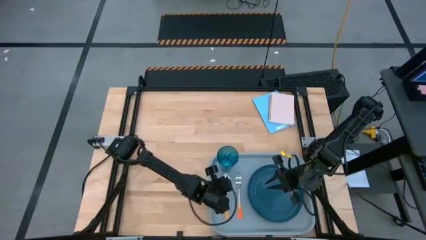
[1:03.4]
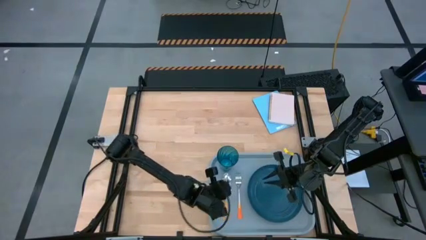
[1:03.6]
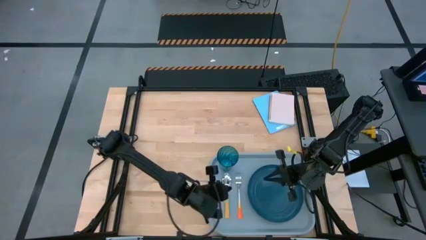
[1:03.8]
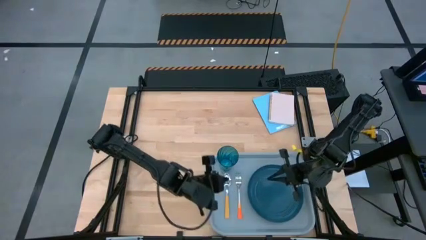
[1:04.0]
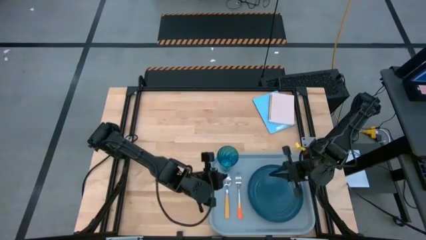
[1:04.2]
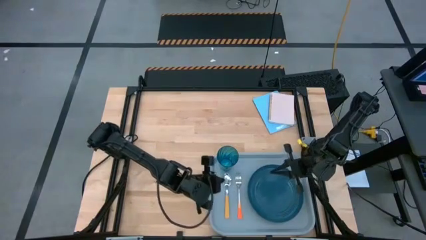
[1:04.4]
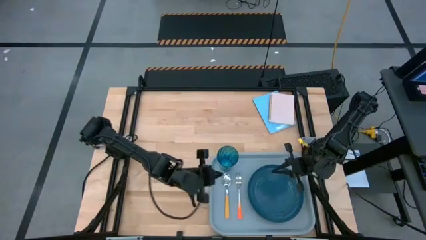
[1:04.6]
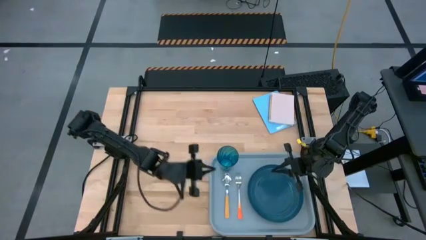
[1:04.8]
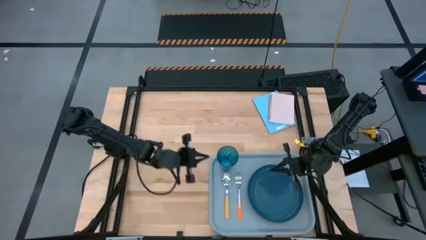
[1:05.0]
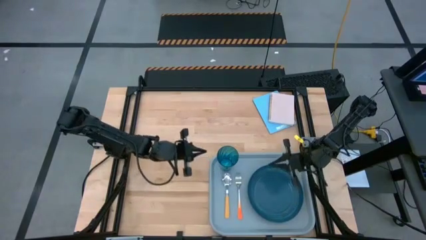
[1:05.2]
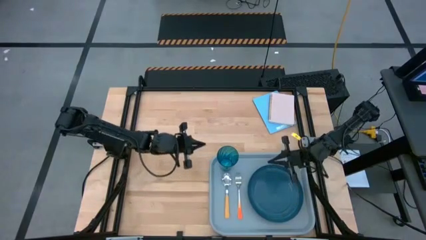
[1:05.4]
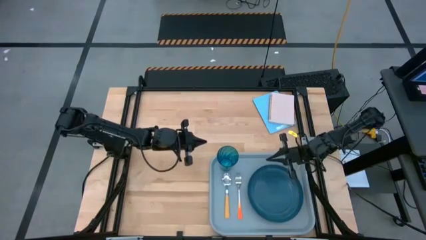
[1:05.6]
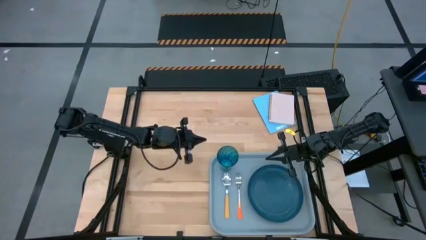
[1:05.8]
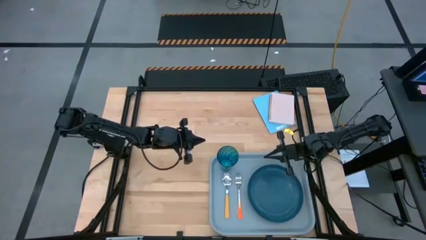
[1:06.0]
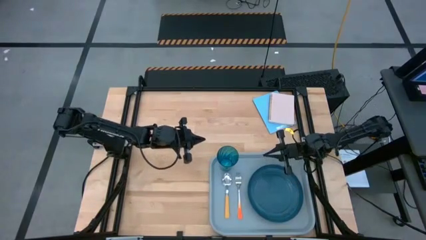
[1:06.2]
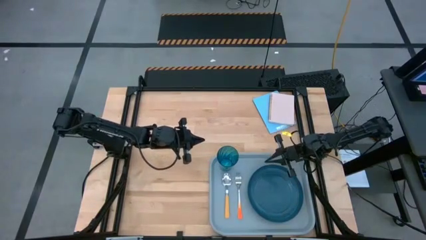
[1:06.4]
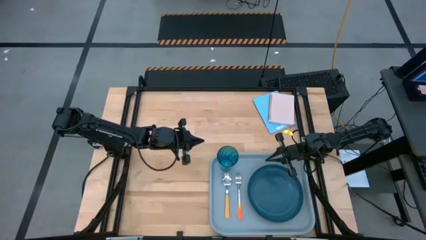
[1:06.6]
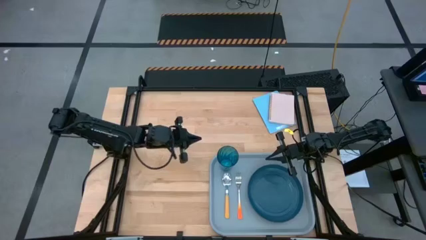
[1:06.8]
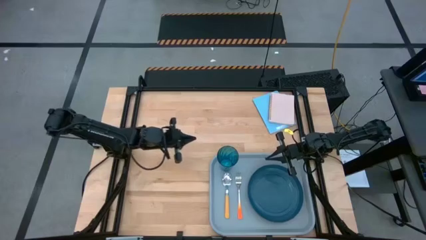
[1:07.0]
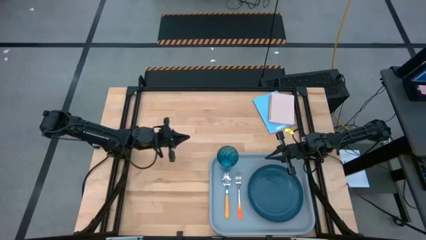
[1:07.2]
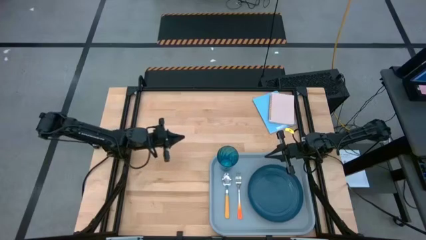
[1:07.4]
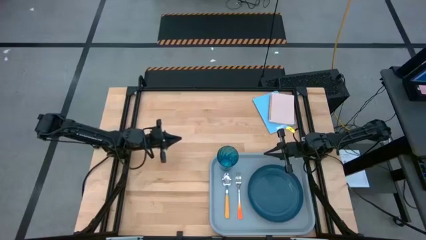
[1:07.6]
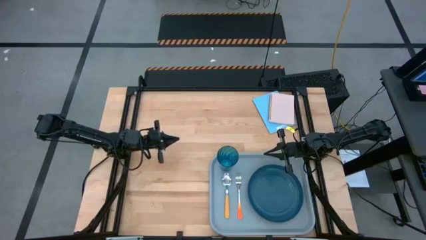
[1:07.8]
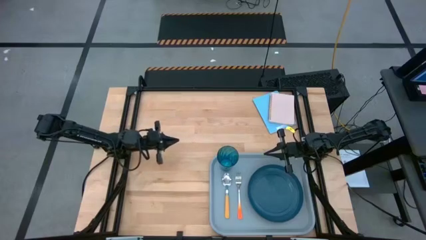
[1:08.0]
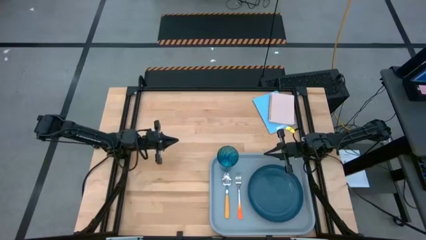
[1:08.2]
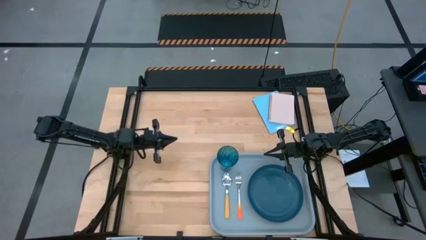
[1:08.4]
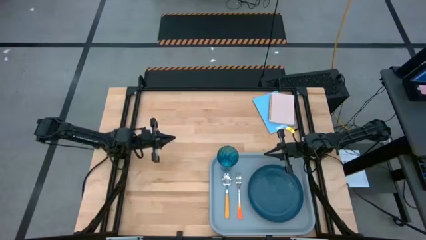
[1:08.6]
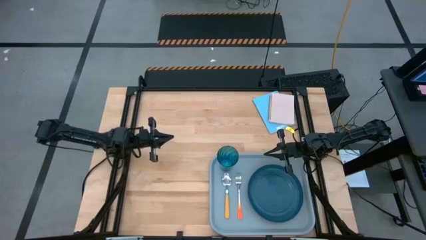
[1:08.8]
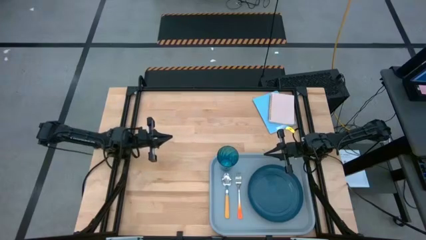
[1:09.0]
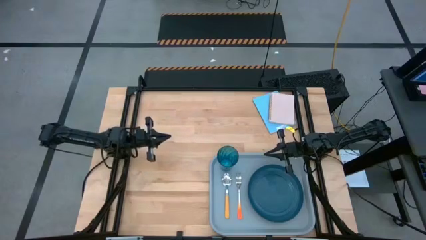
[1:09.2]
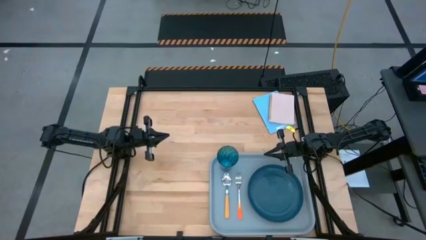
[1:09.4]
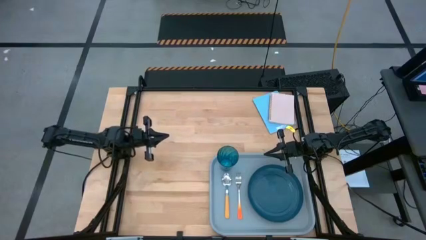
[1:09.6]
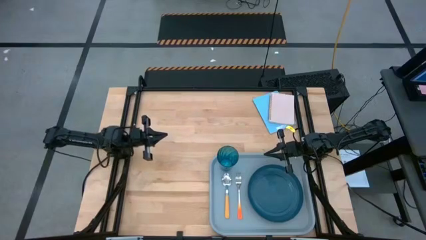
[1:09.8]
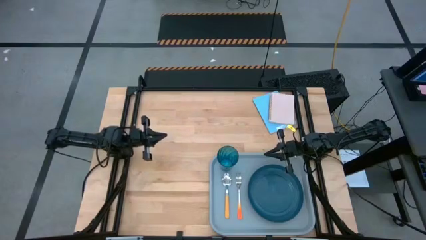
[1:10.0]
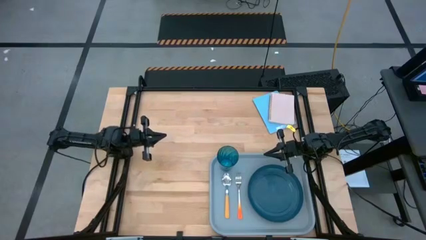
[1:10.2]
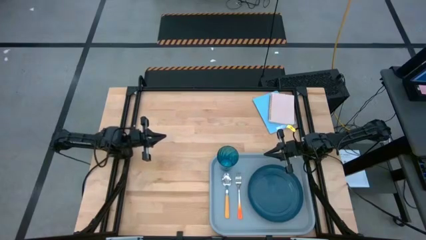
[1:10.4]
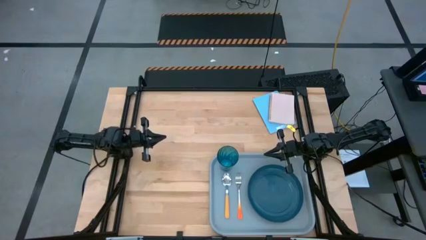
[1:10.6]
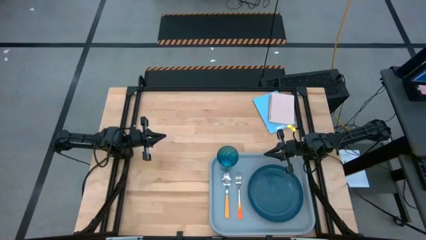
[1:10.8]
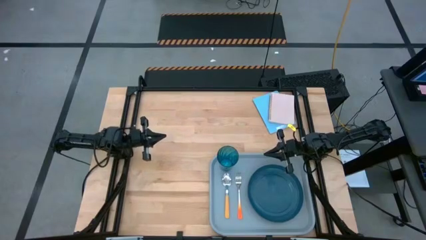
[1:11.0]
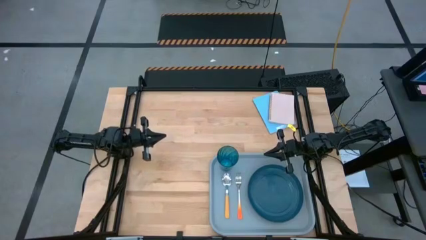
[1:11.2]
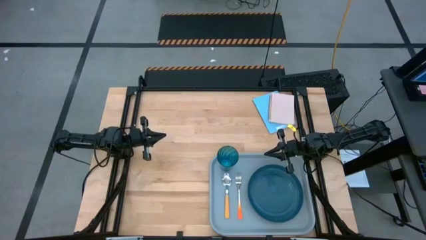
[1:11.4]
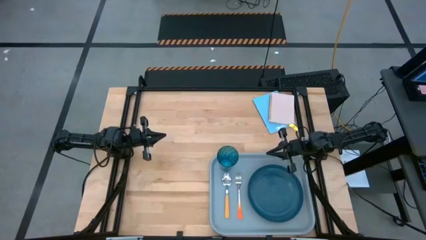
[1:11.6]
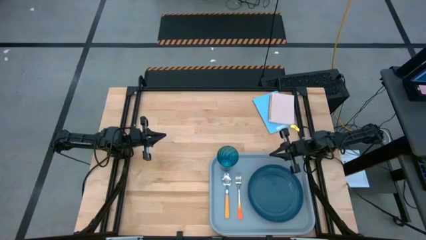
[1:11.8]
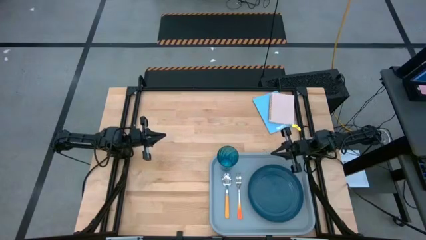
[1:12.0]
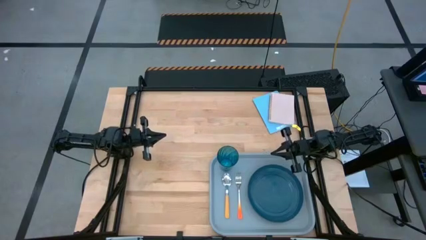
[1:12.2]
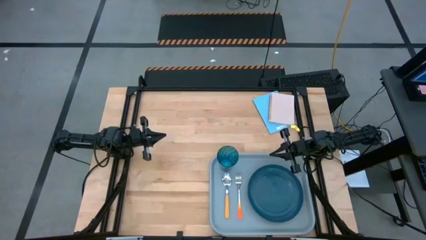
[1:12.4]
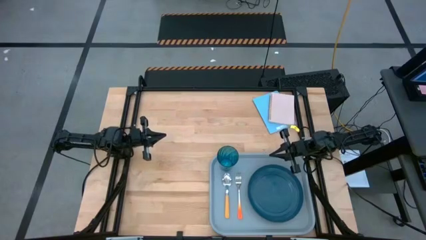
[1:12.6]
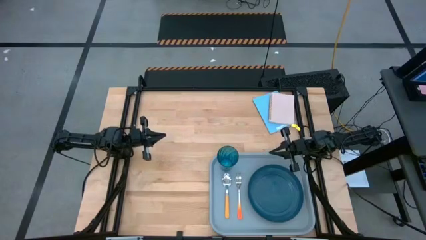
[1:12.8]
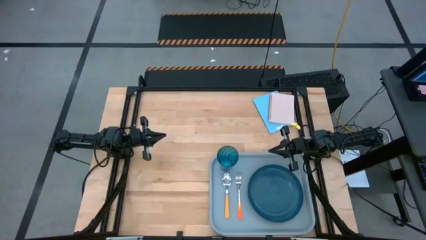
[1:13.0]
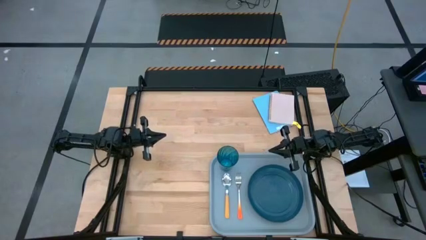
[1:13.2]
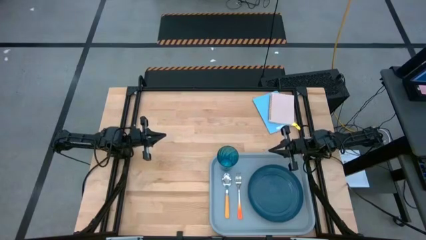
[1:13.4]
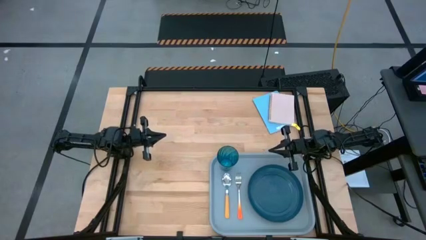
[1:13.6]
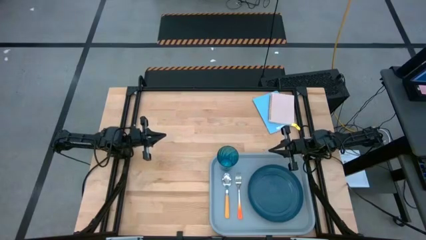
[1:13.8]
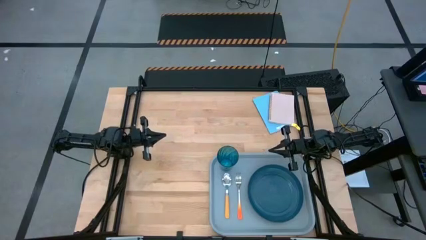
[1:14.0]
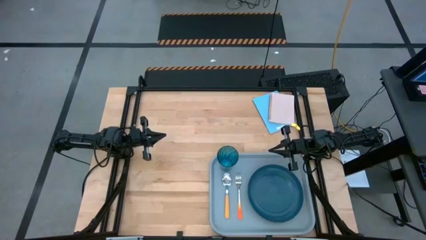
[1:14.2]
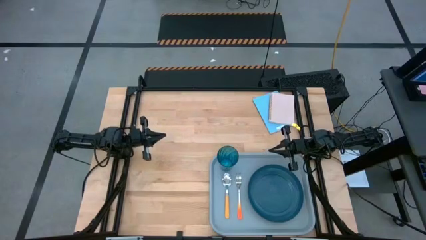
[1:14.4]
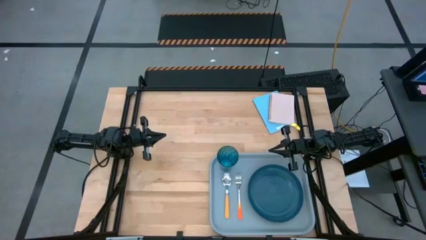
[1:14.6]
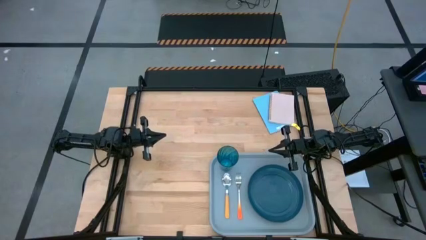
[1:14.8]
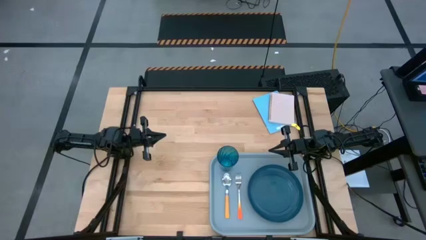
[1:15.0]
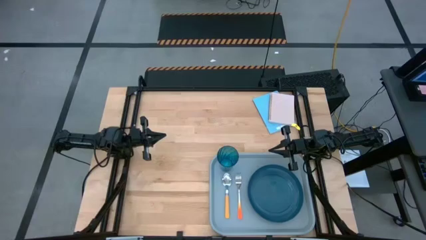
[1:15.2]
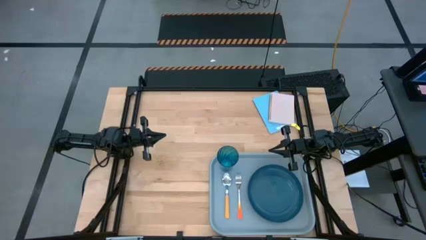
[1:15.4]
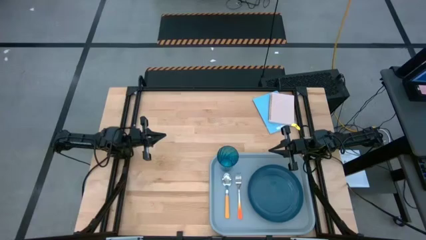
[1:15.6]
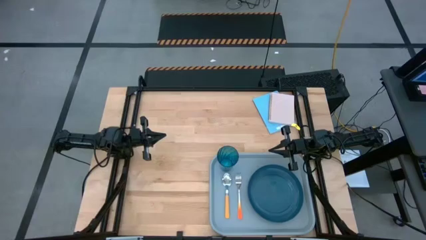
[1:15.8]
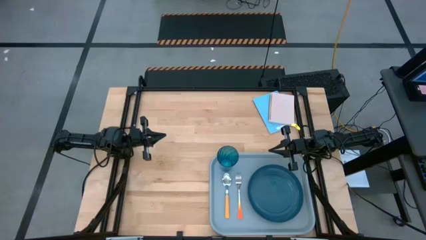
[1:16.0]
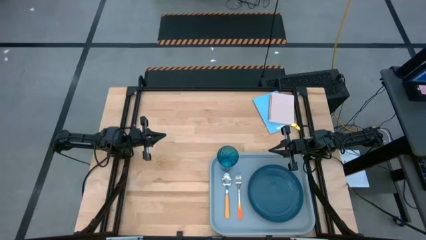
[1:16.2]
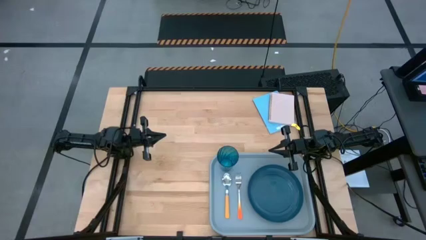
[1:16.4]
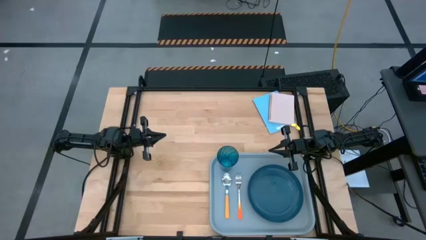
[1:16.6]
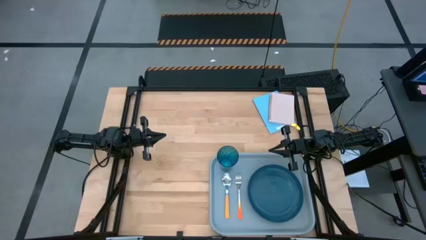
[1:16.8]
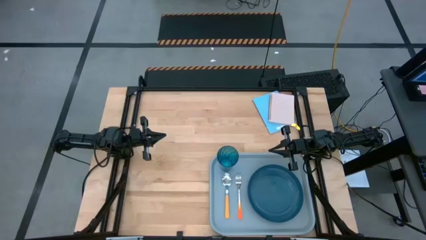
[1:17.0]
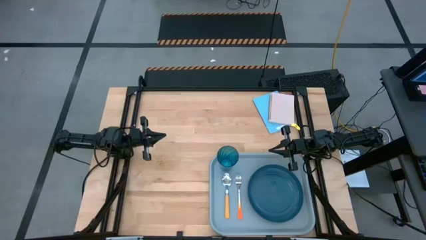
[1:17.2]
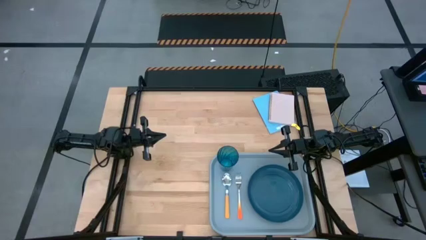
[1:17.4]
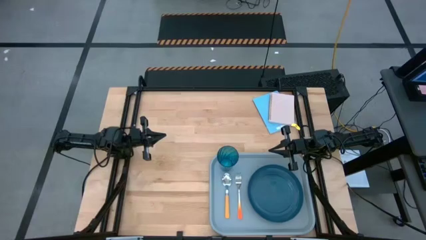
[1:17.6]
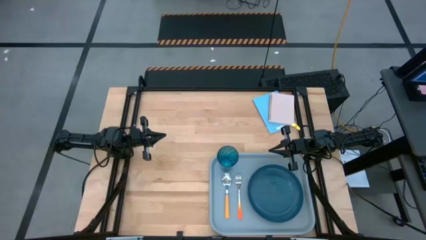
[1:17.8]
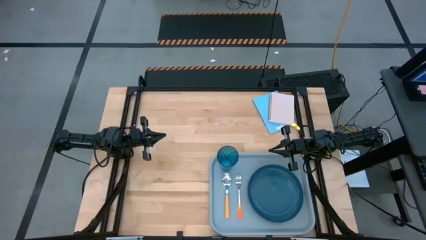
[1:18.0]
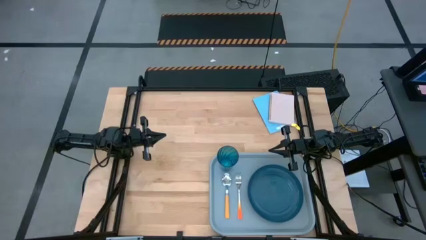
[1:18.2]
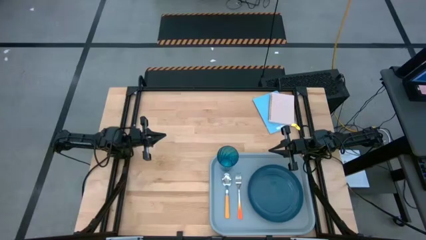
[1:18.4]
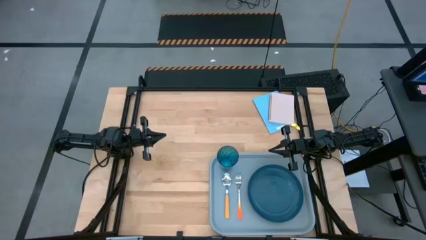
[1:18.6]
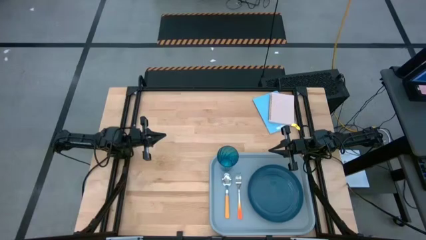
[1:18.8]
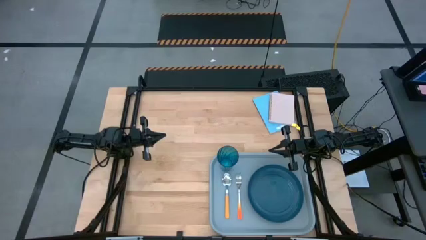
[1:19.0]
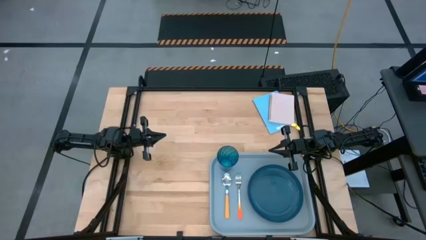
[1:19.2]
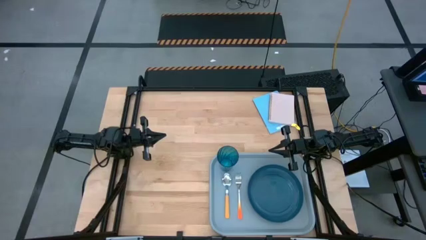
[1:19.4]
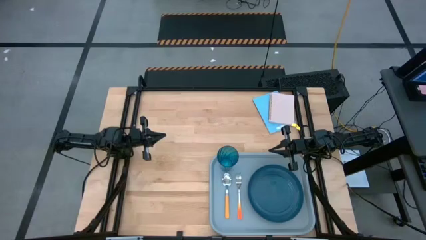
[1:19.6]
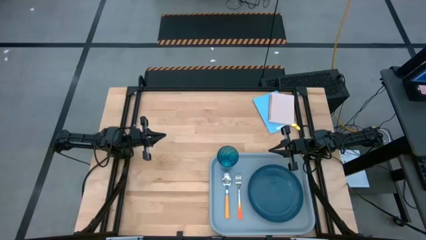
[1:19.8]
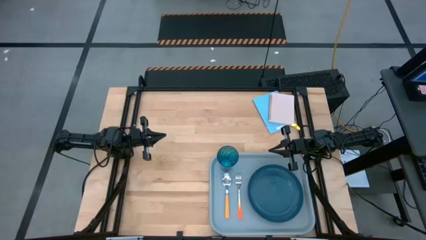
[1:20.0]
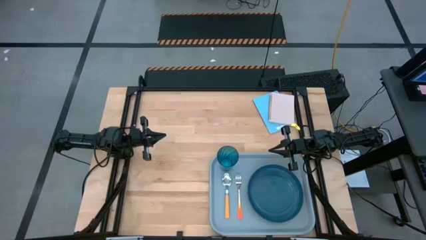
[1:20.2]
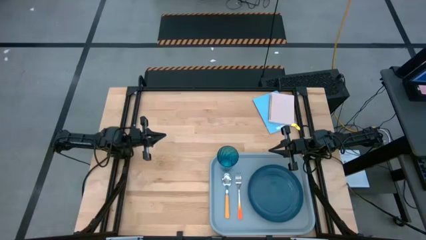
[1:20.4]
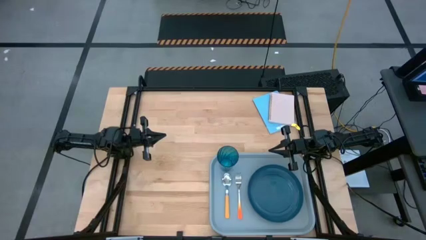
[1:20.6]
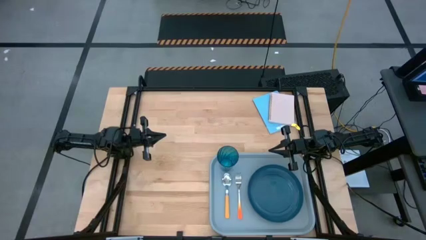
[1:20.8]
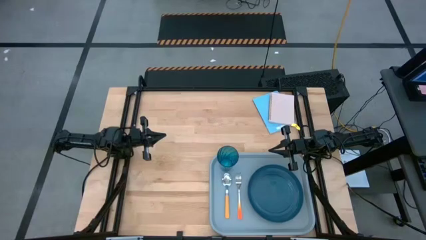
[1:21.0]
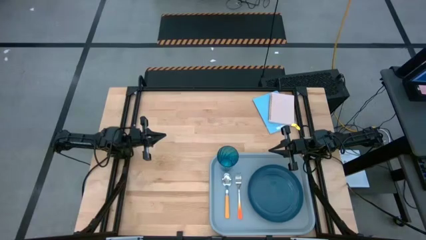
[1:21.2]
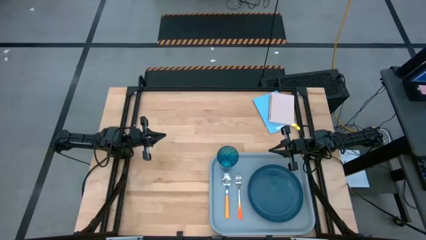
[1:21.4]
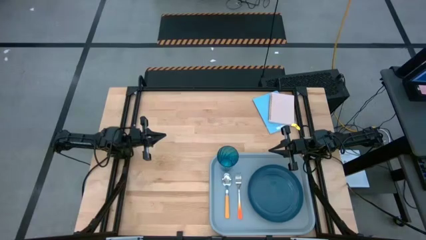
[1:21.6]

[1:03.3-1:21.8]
Task: Pick and place plate/cup/fork/spoon on tray
Return to Home Position
